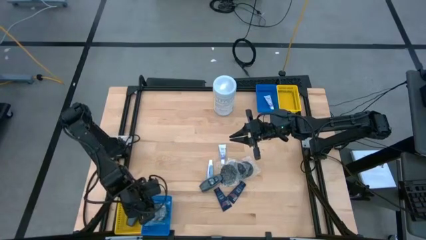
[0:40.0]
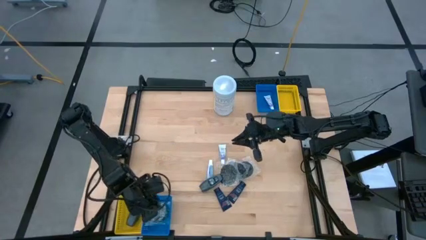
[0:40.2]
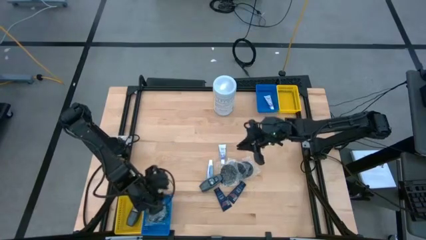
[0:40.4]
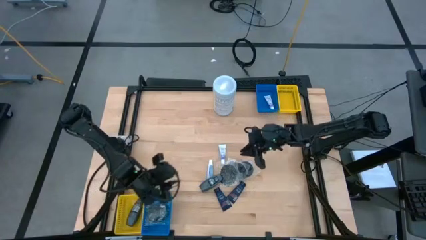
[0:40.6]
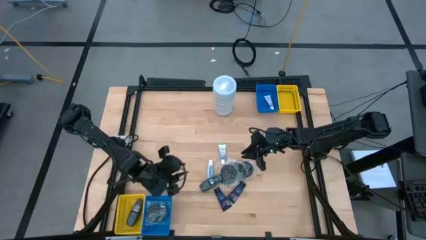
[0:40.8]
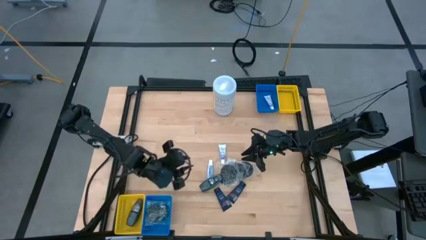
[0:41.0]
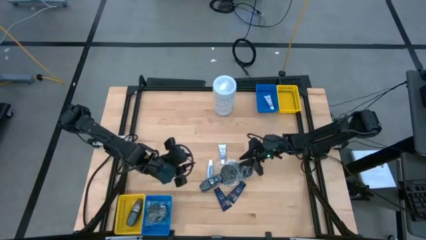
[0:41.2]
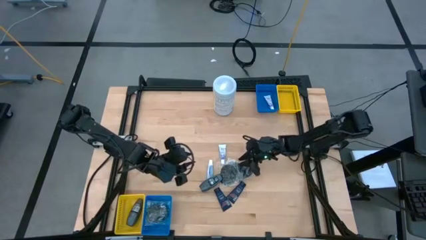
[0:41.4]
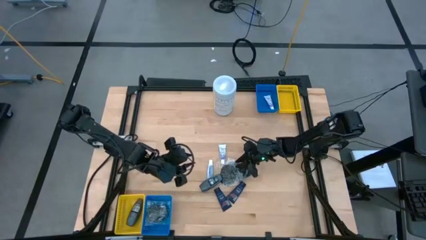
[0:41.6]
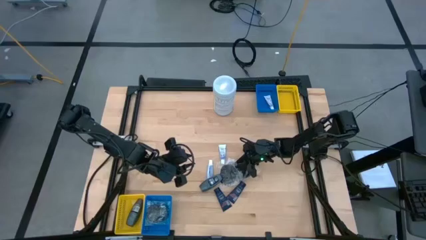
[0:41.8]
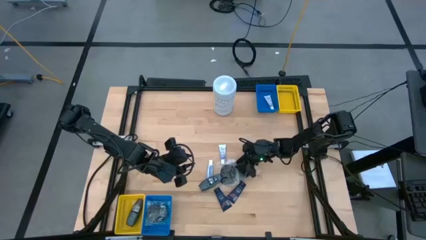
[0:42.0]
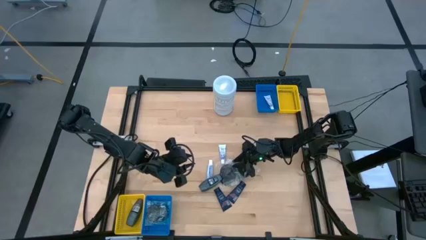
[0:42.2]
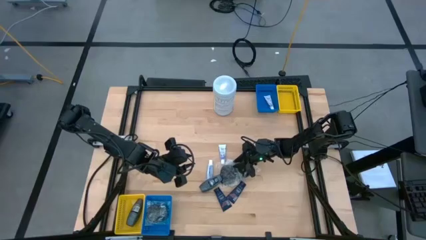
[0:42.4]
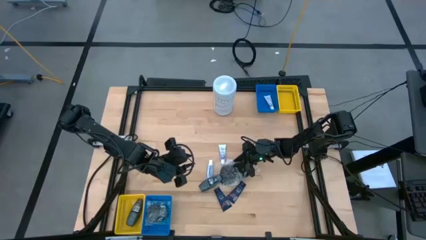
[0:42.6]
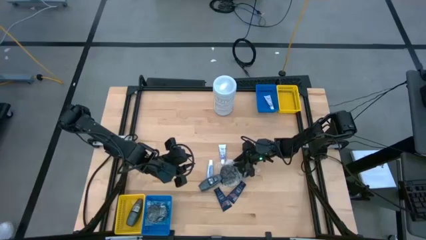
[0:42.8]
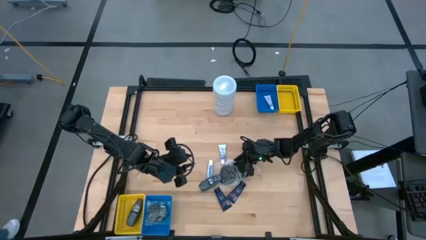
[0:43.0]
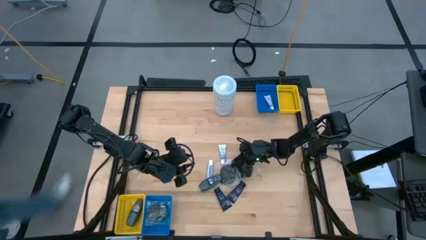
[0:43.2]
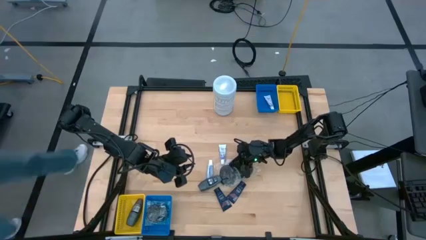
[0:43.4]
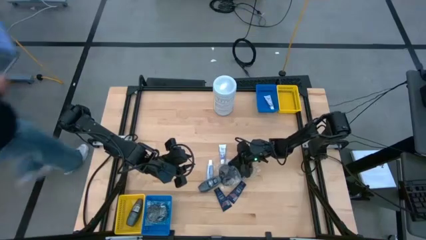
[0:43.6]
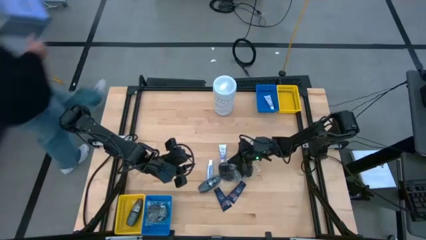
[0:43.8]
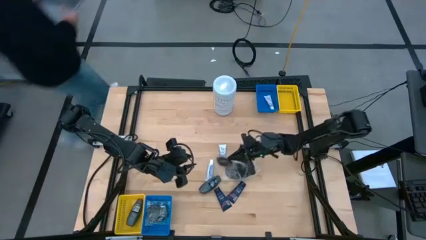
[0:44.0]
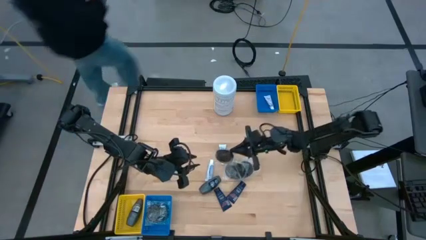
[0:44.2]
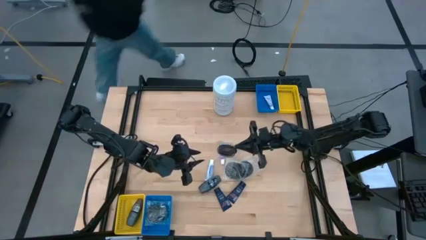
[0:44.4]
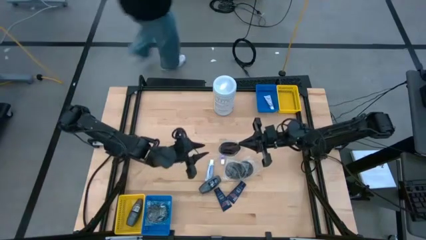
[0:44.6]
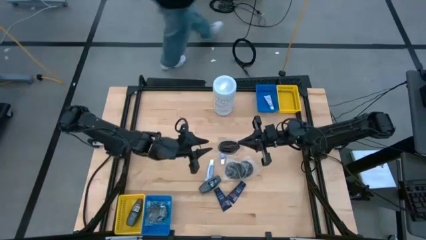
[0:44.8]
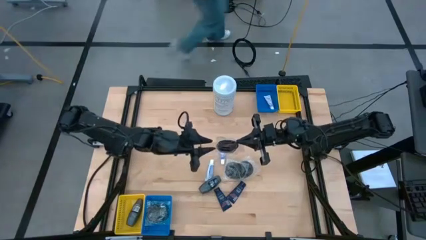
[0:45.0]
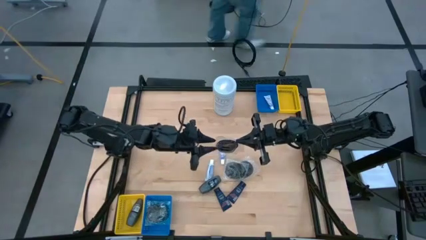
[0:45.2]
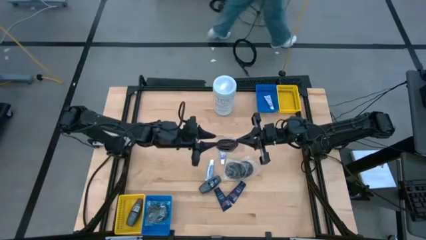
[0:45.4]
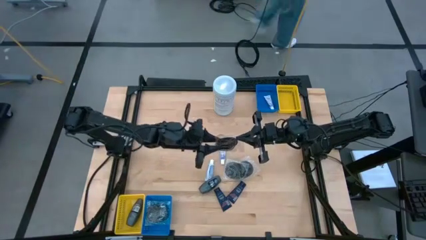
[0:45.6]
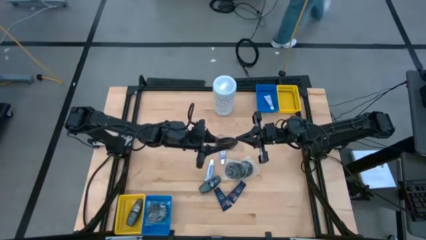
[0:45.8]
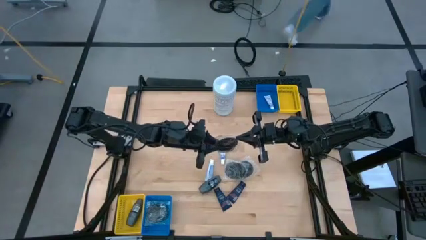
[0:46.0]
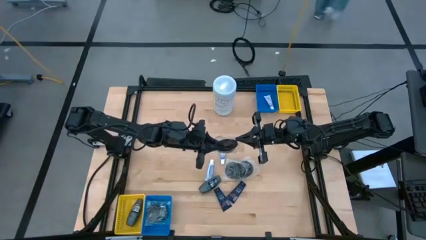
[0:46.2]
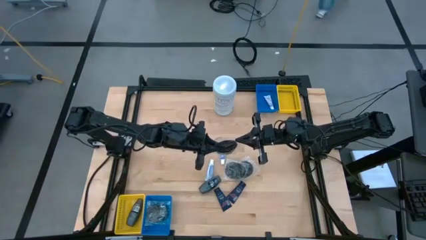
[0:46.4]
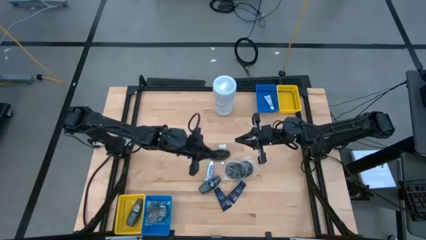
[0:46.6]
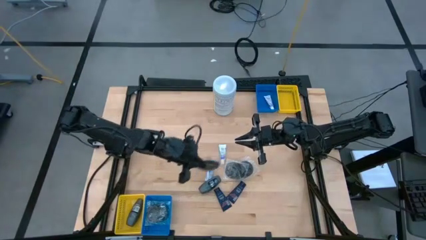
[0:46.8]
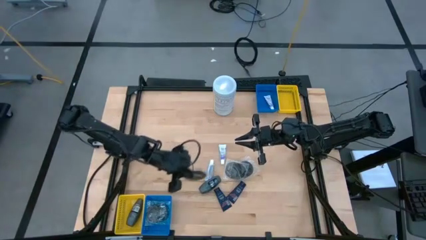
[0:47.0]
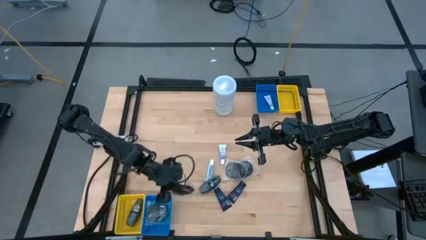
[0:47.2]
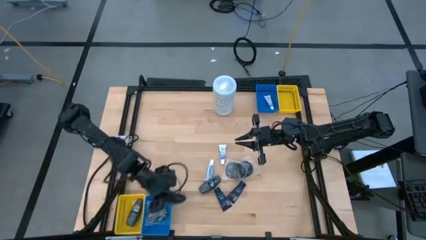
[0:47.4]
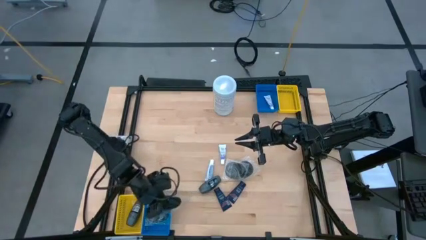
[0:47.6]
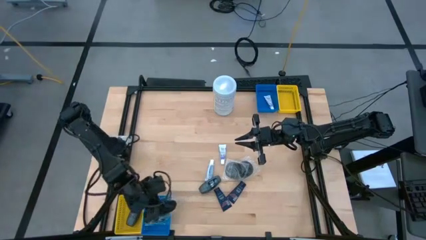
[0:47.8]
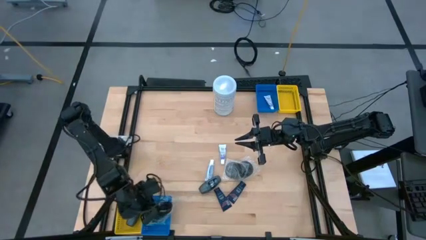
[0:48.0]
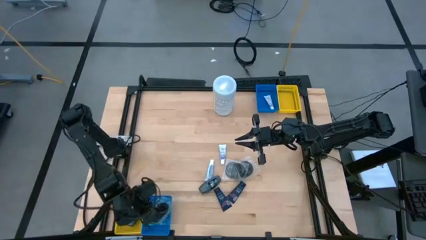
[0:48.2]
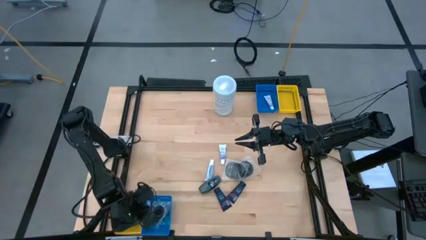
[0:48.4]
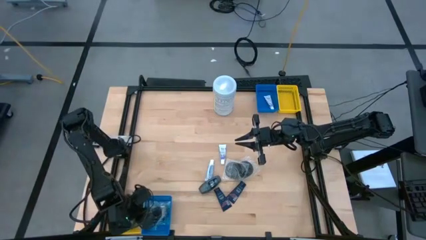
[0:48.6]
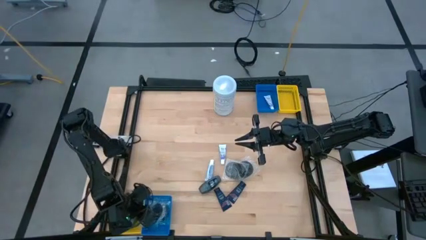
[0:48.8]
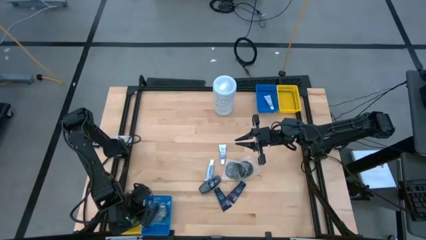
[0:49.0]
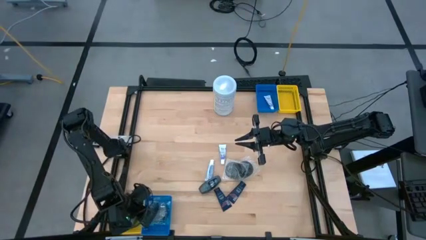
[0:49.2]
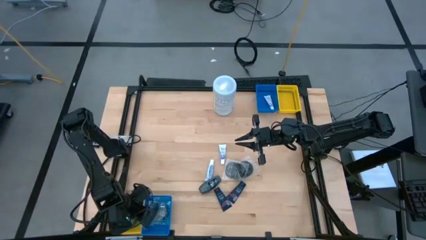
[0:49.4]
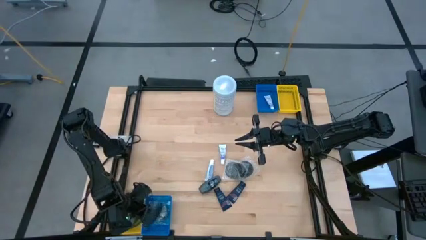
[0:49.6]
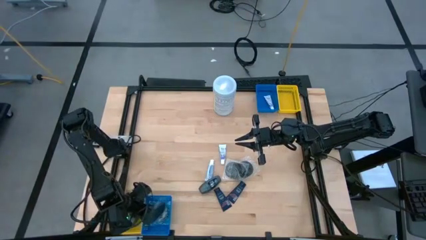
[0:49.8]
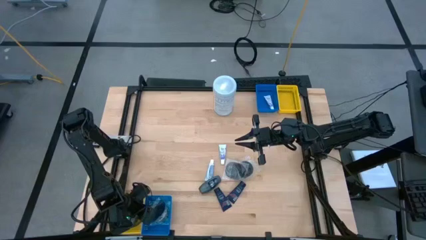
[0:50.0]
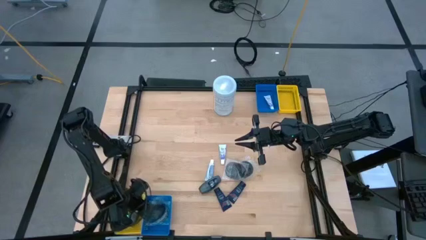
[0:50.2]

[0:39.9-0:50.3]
Task: Pick & Place Travel size toiletries
Put the black hairbrush into the bottom blue bin

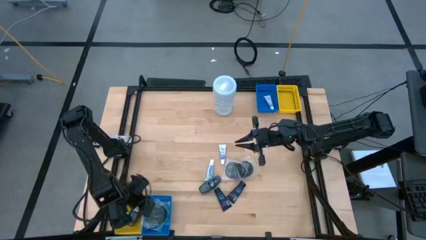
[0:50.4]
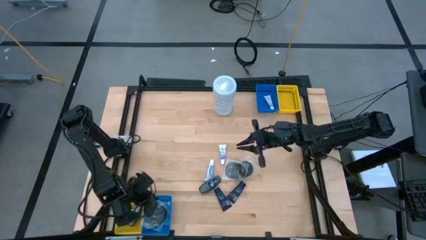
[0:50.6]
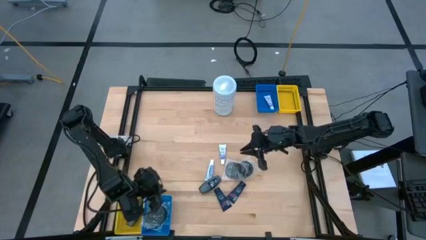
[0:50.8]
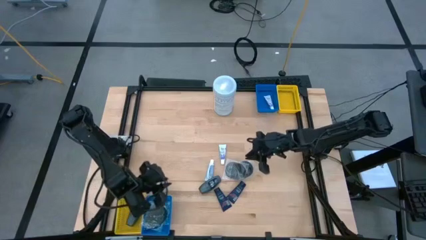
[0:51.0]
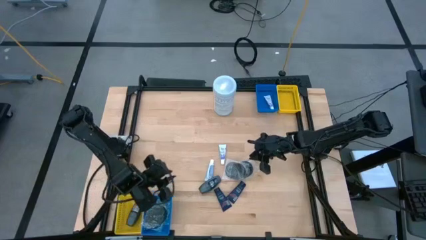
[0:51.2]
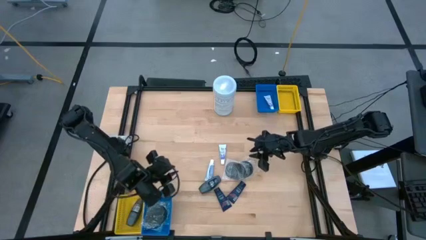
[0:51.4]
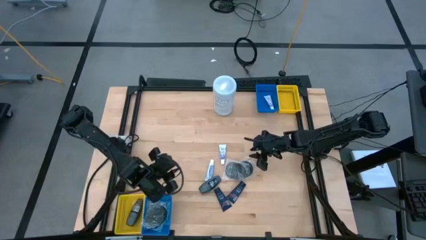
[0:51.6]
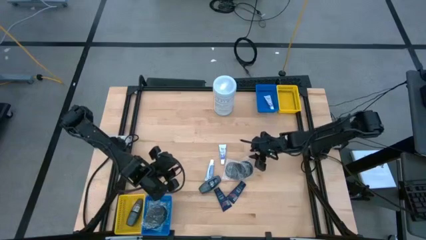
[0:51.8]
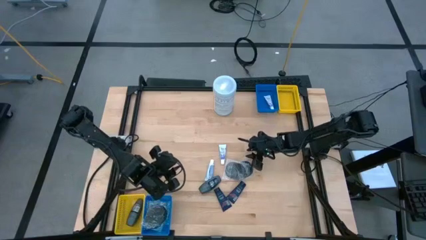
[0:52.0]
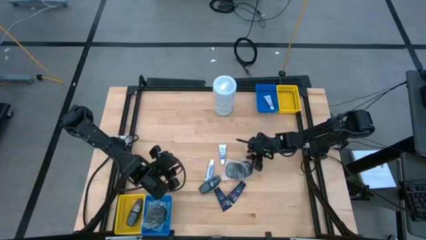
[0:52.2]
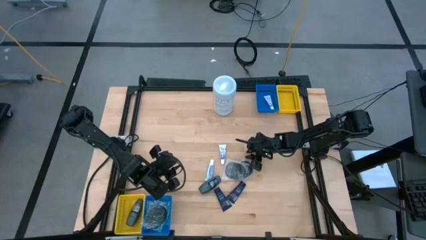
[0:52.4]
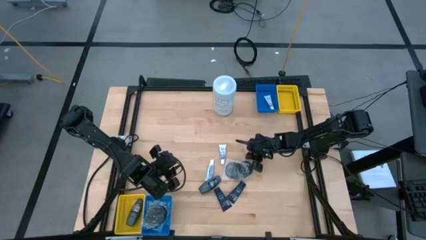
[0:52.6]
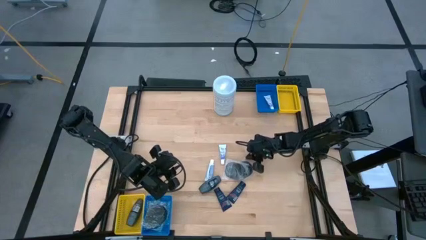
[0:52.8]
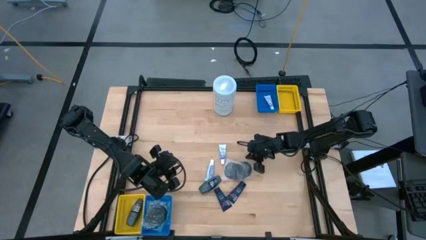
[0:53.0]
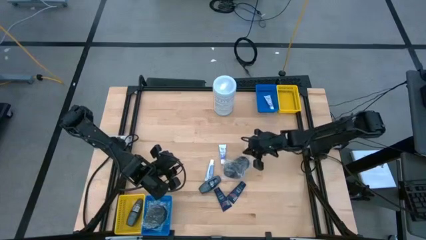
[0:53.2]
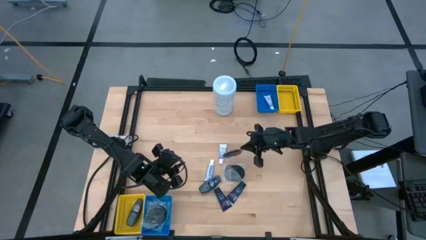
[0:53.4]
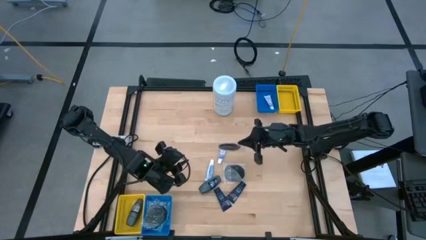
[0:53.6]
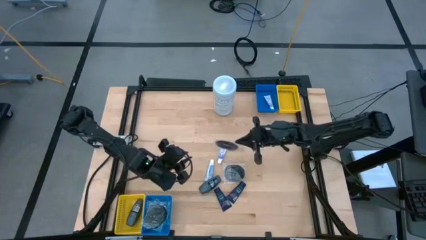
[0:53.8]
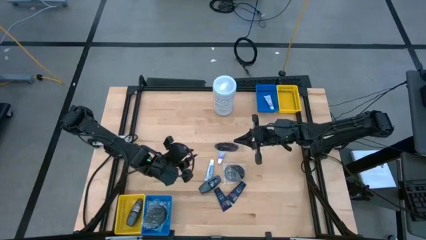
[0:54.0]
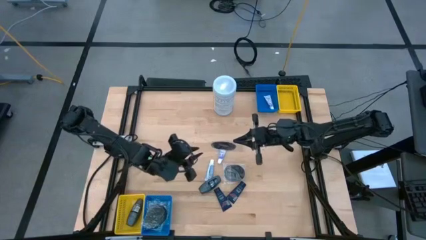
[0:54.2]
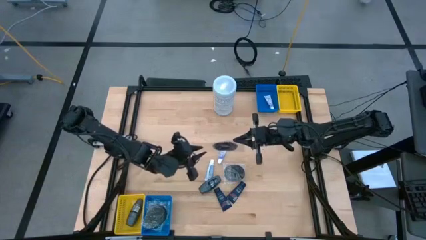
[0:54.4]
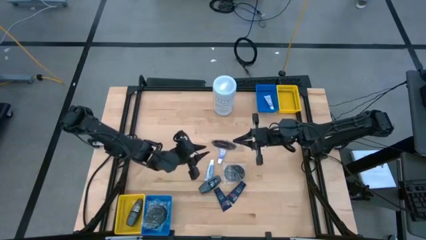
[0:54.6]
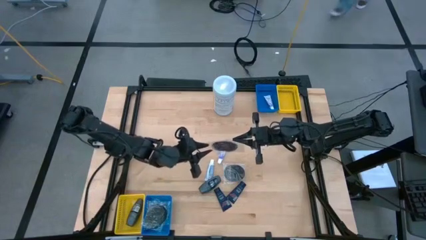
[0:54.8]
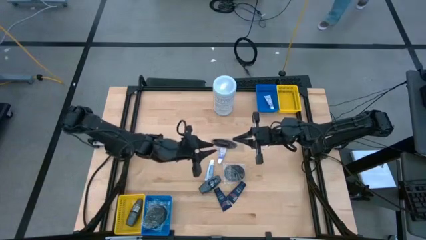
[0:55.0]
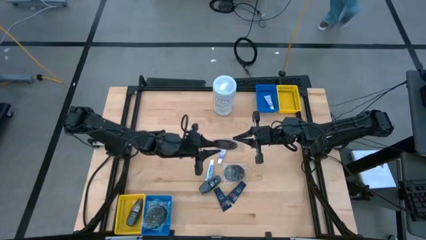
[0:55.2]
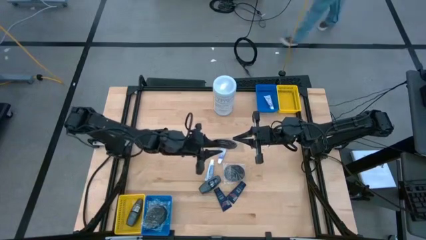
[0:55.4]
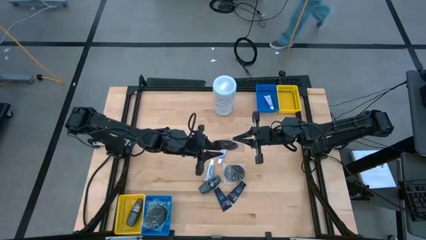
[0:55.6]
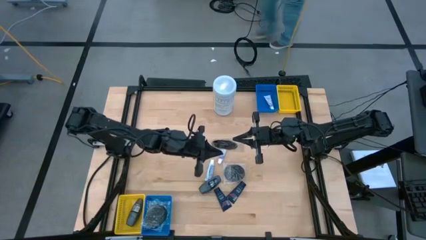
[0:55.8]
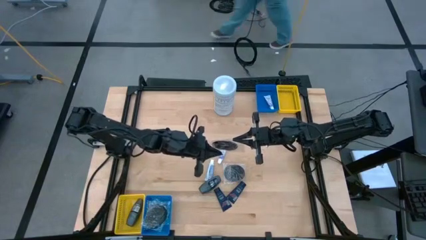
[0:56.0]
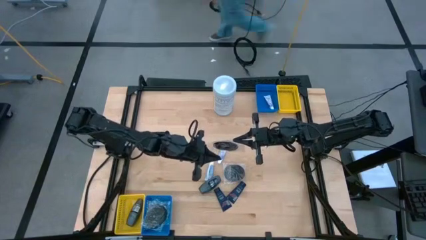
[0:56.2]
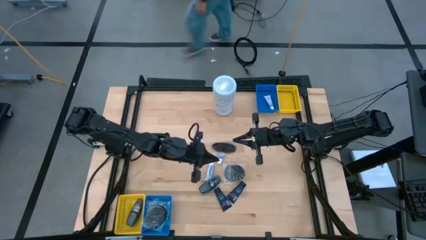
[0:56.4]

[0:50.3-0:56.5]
Stack the black hairbrush on top of the black hairbrush in the bottom blue bin
